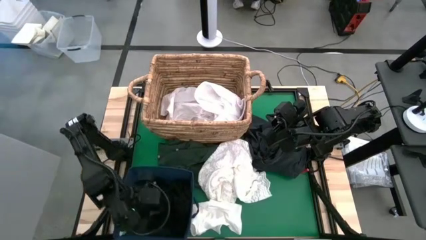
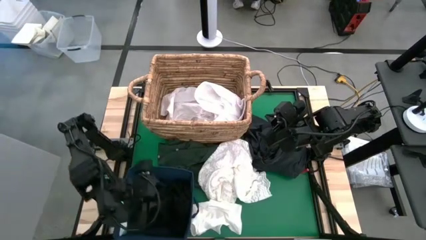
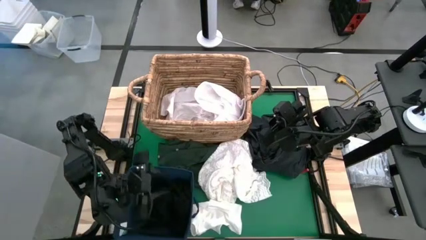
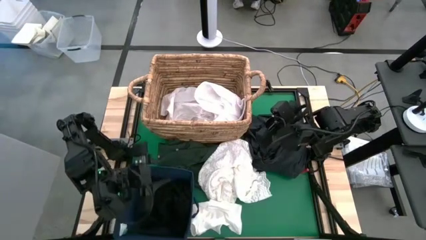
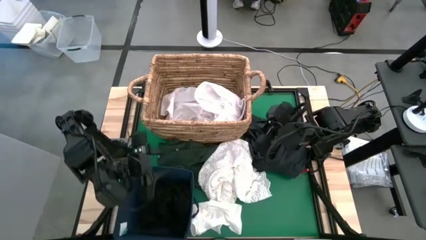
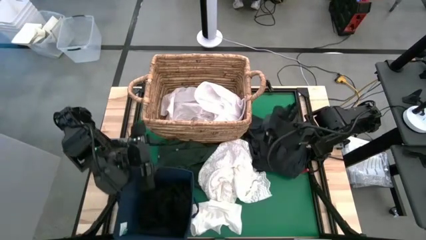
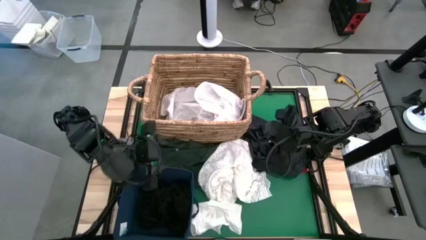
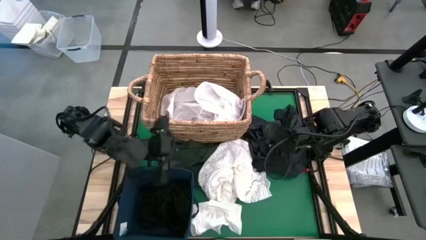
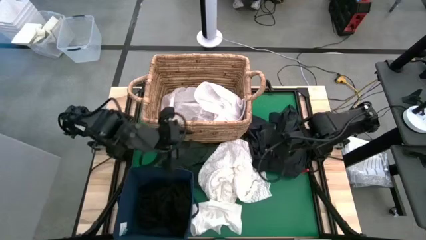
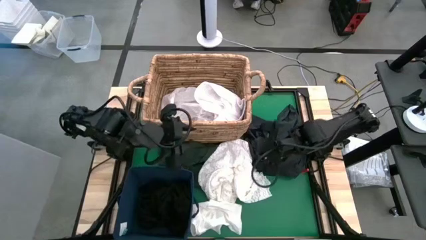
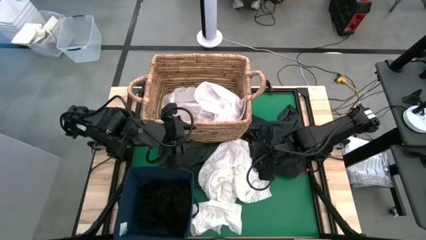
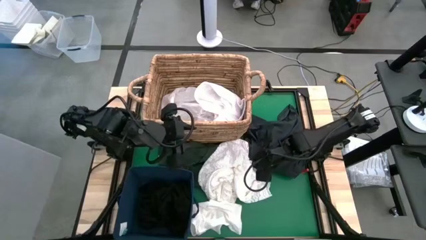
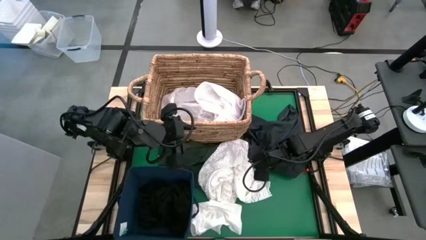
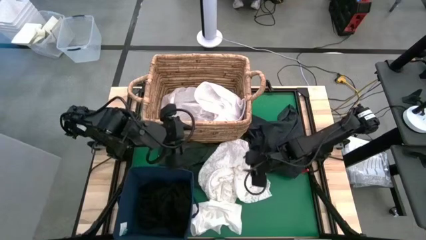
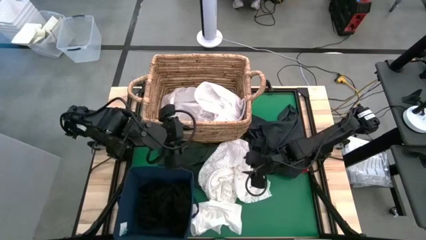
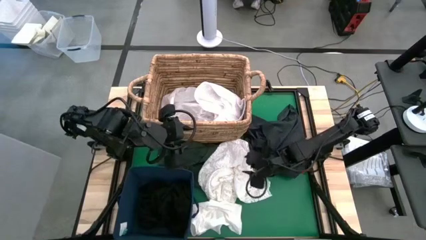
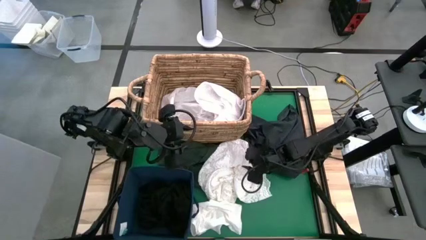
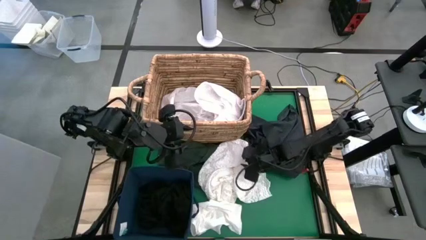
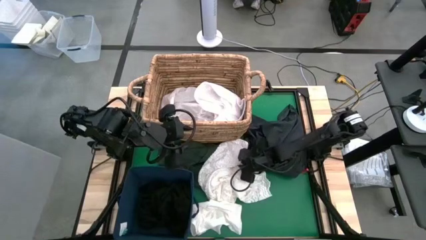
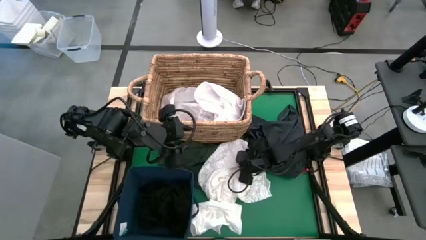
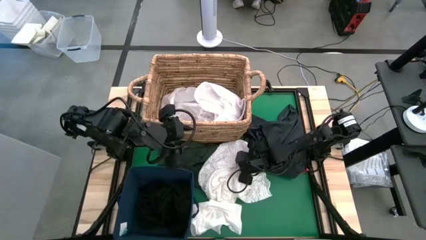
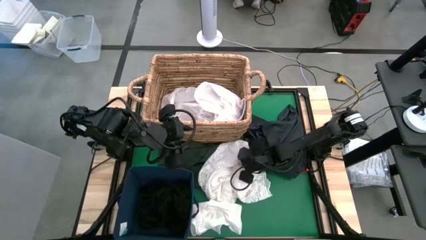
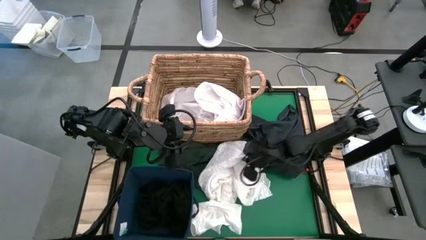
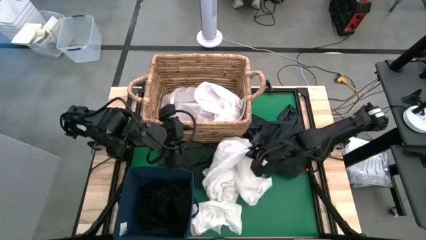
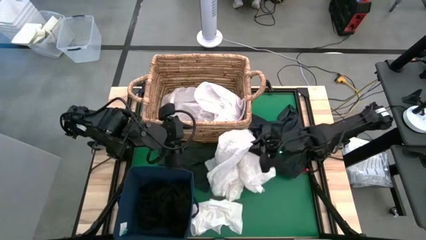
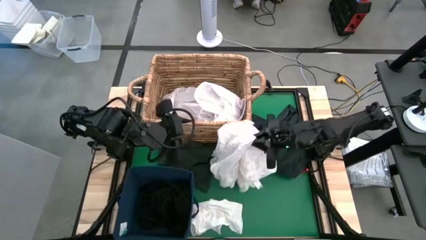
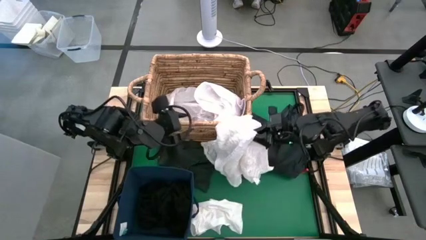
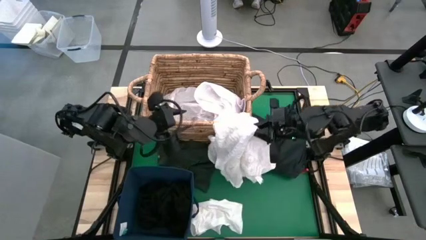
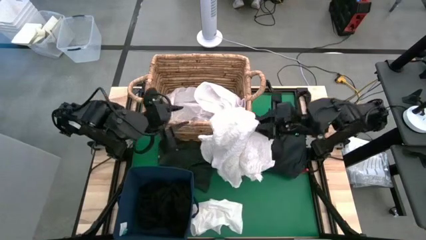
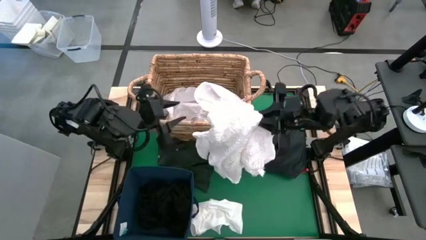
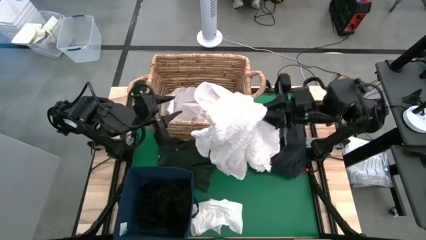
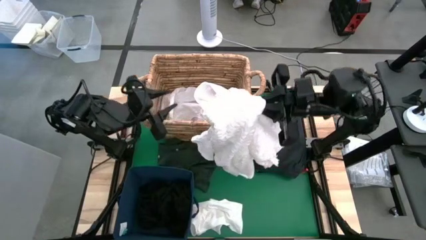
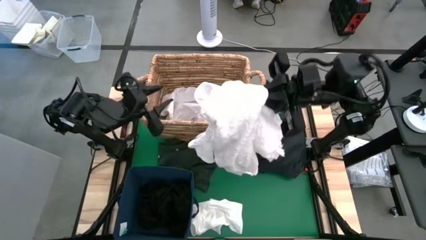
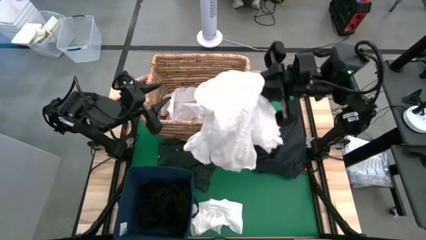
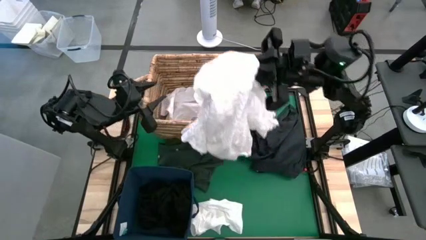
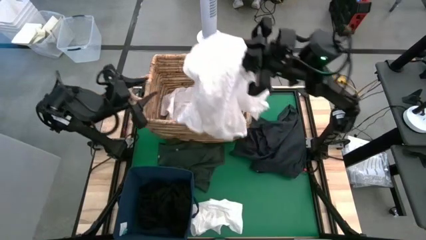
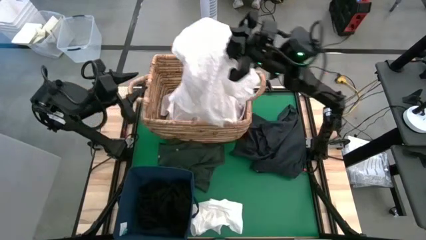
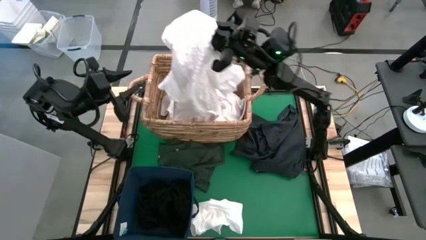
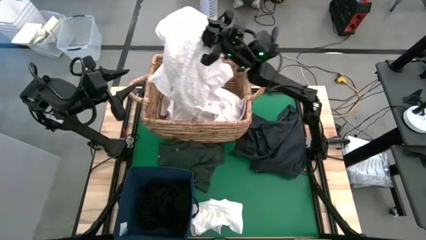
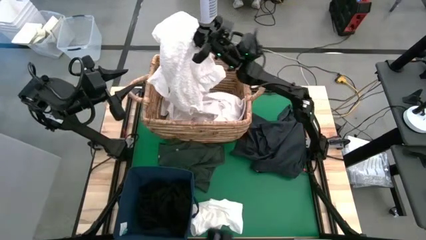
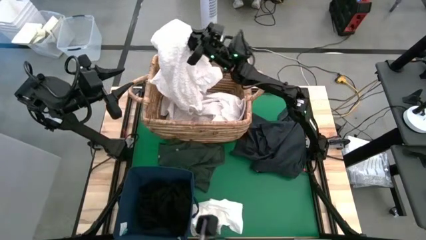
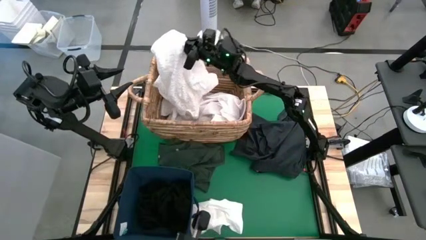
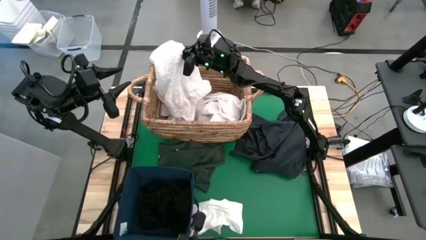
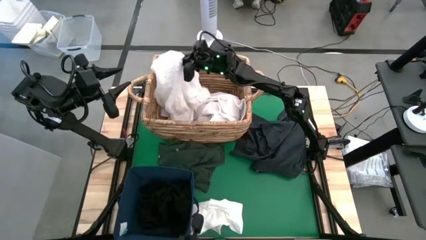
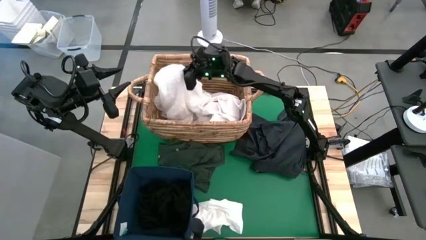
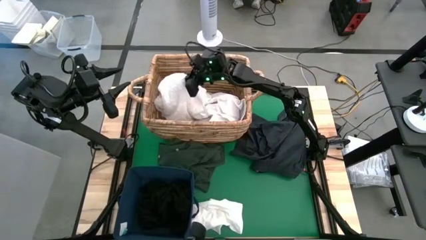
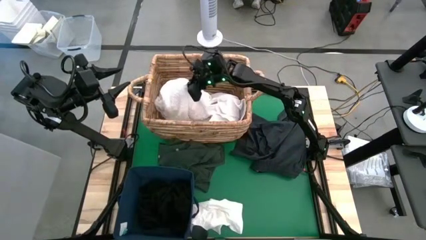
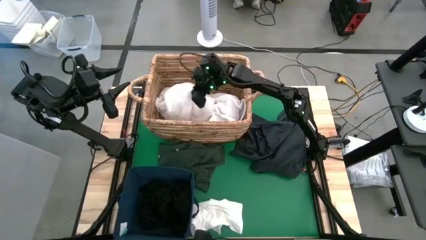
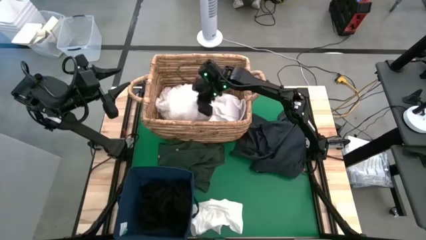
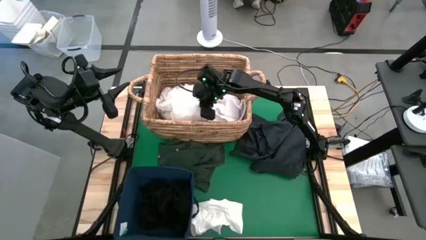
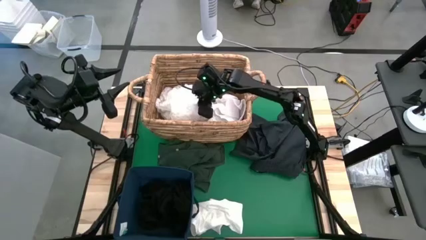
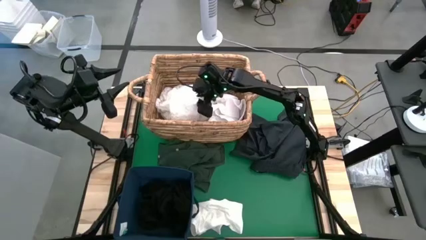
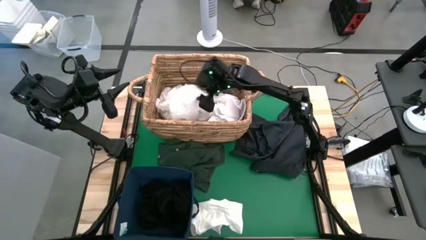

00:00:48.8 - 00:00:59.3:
Put the white dress into the laundry basket
